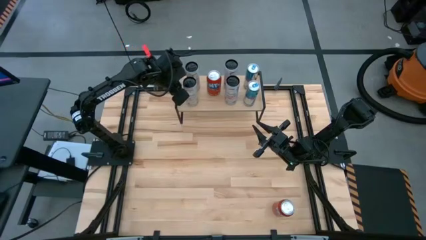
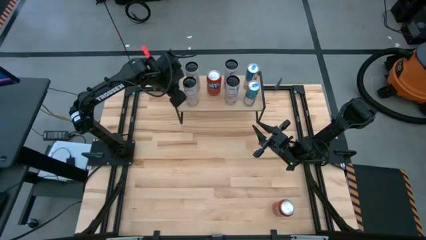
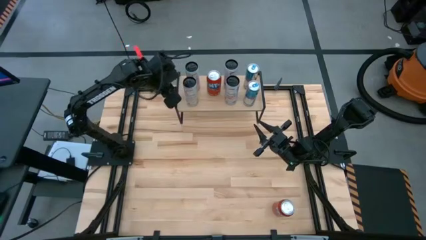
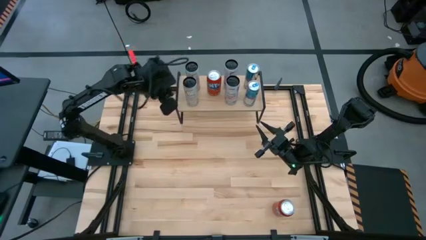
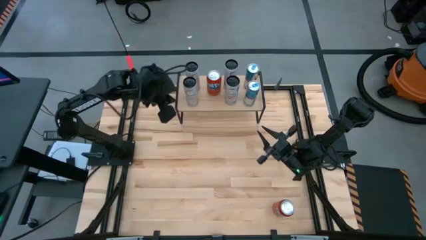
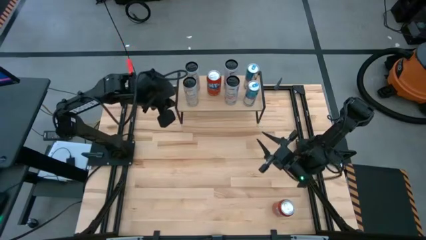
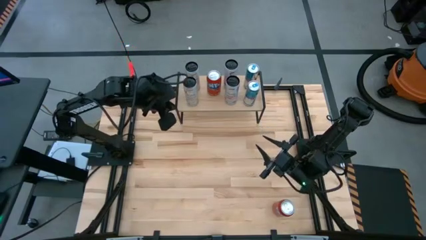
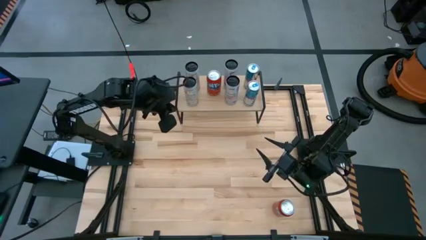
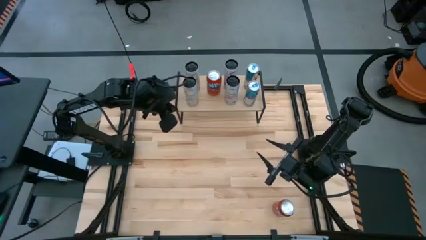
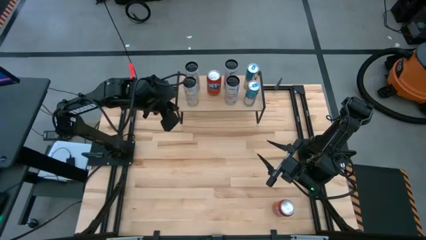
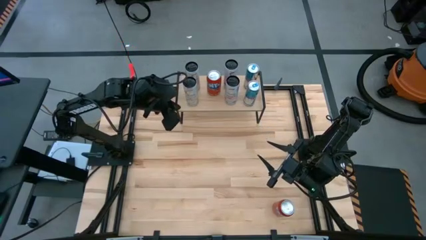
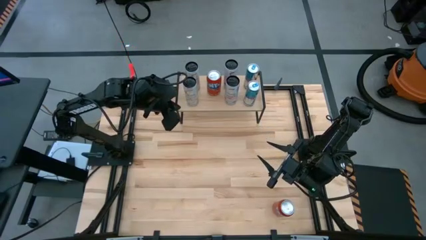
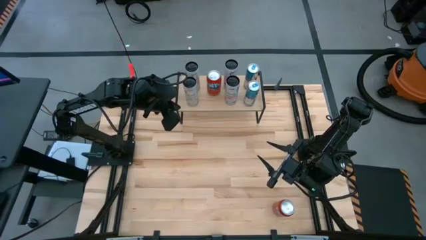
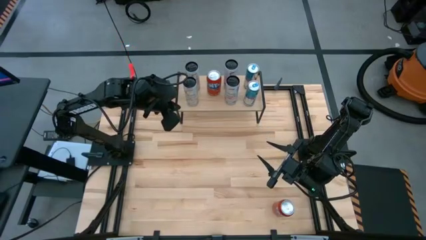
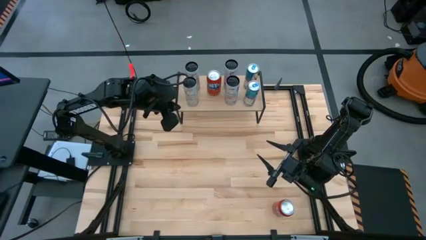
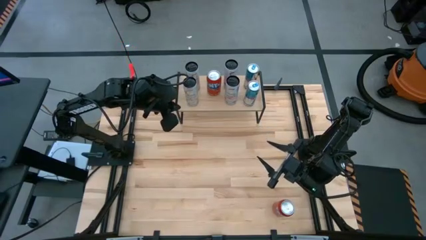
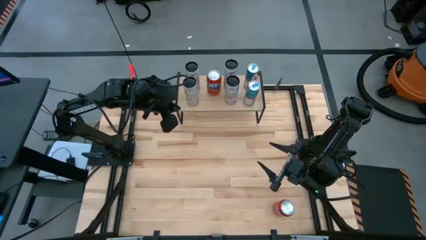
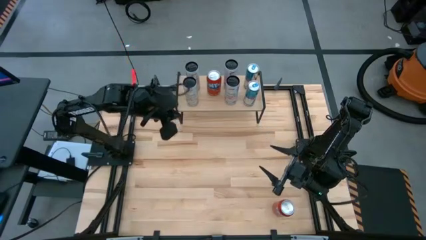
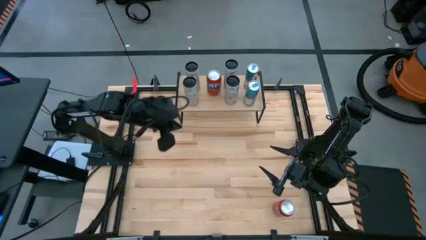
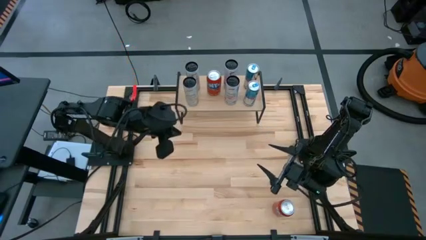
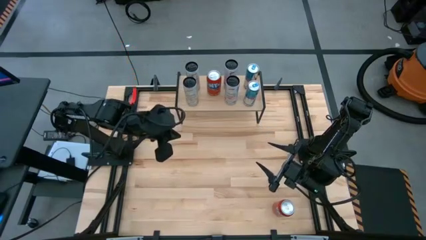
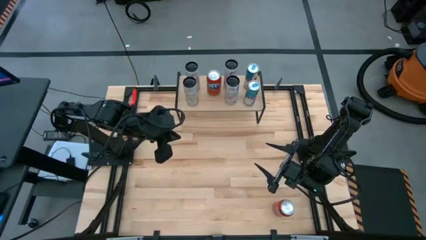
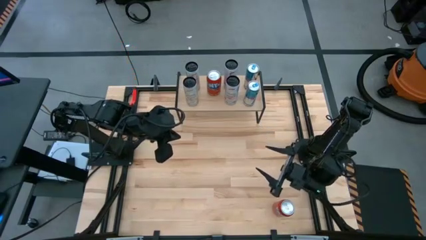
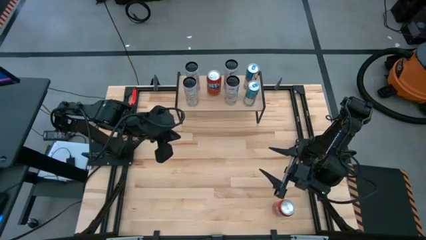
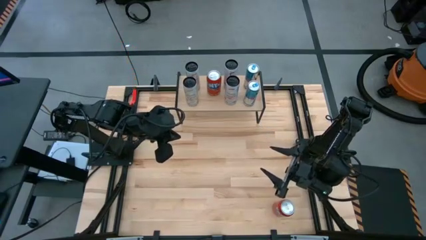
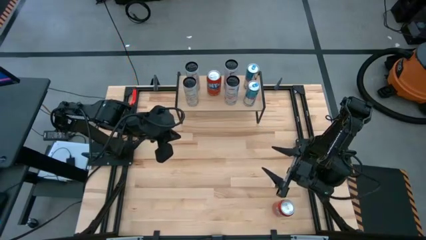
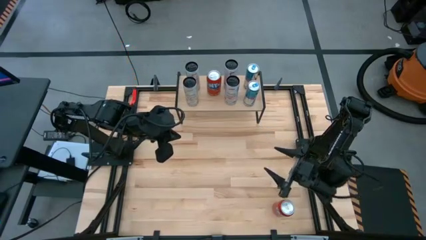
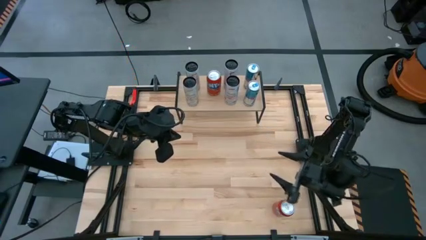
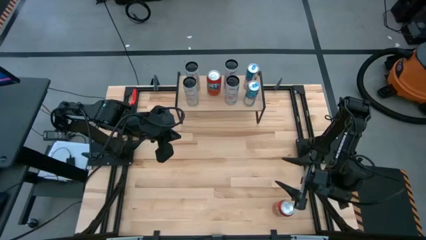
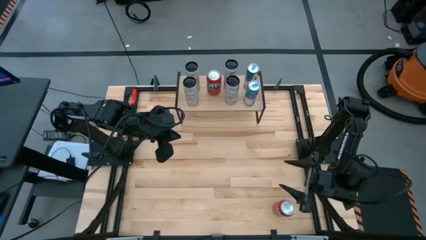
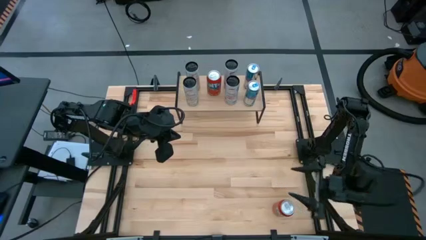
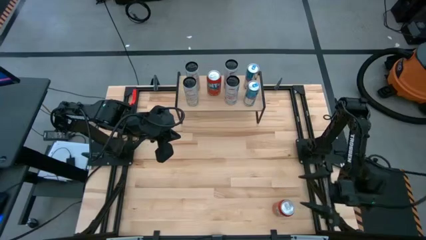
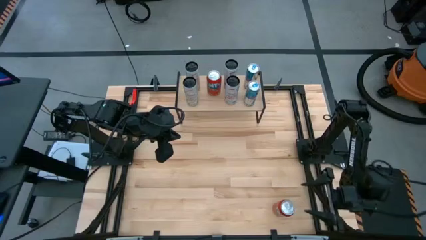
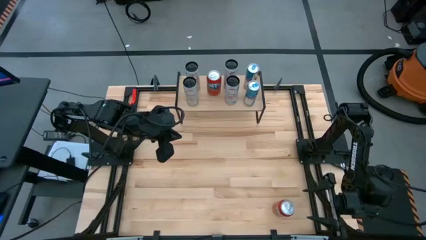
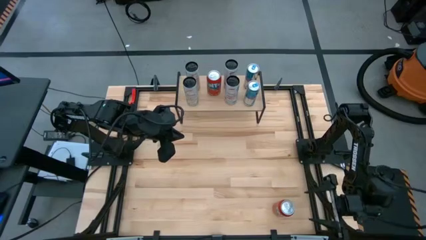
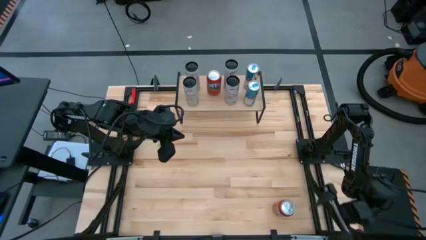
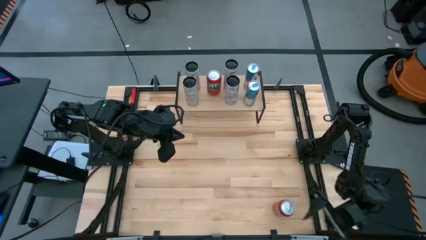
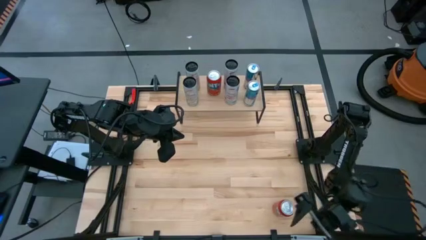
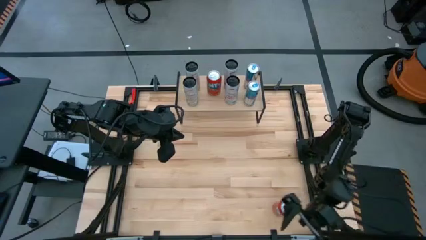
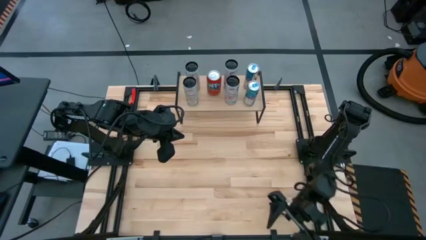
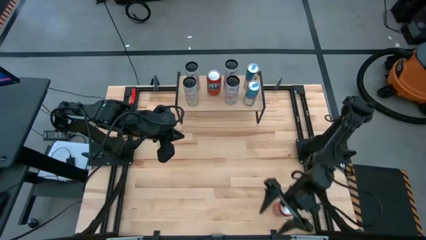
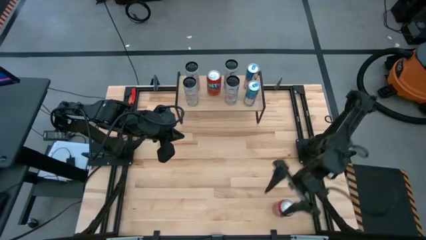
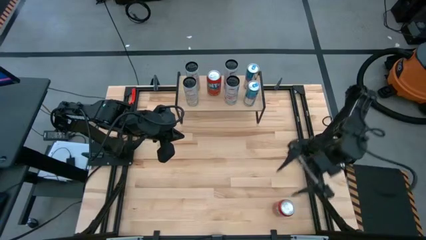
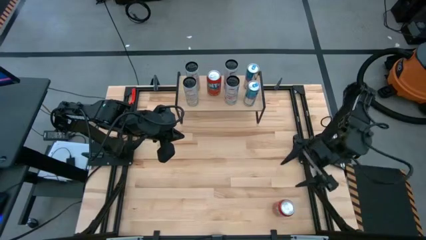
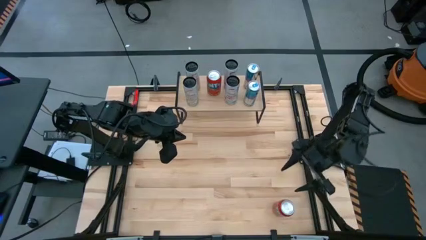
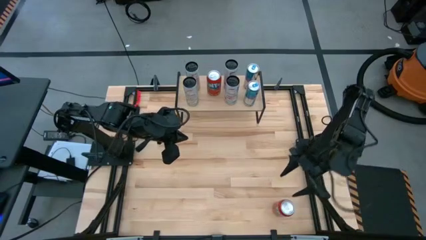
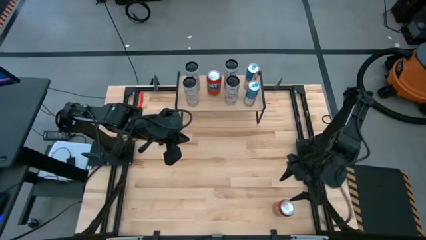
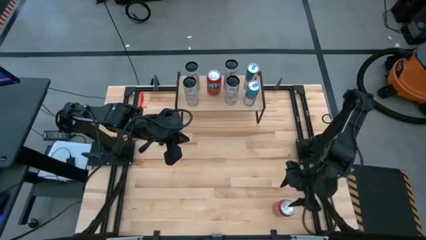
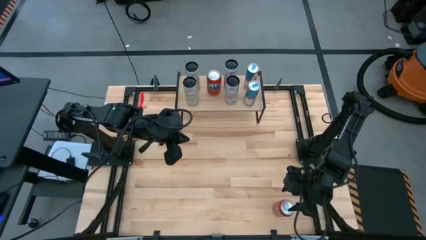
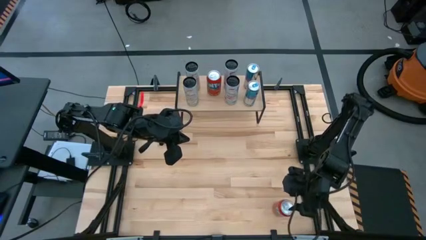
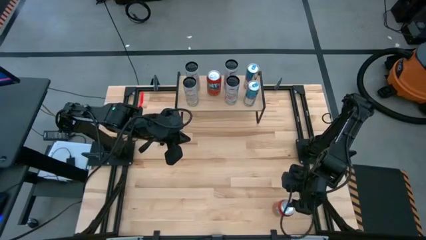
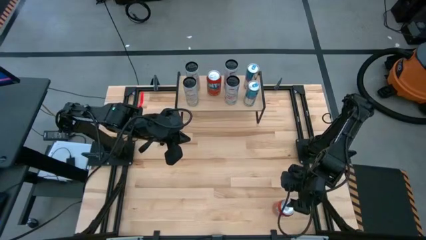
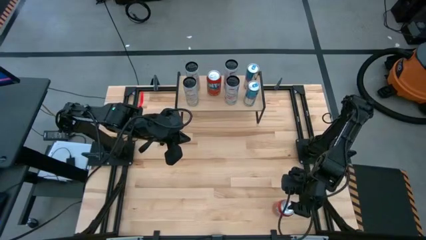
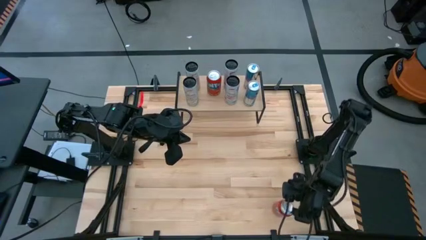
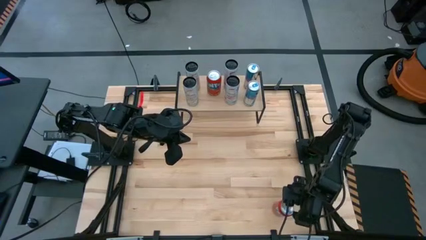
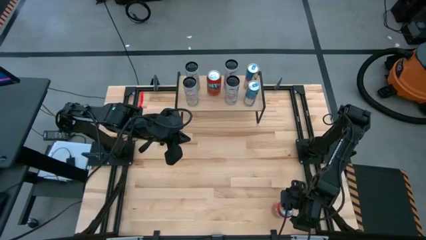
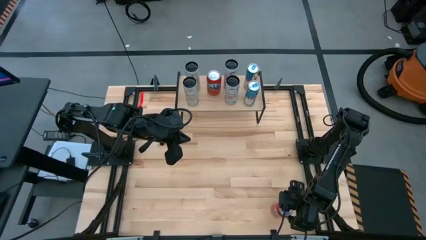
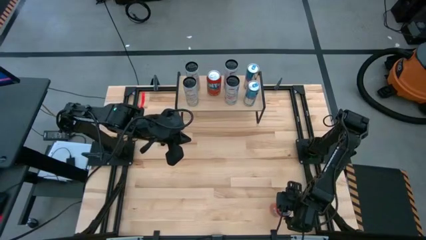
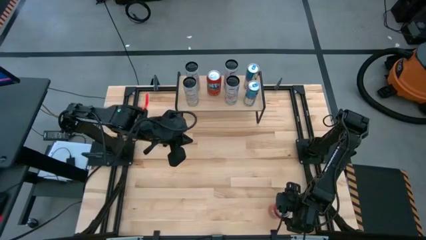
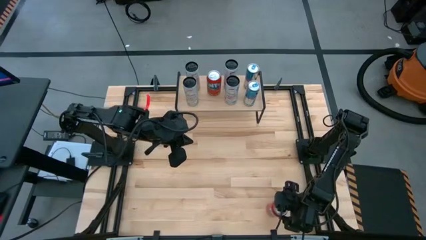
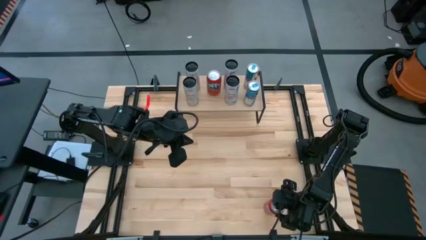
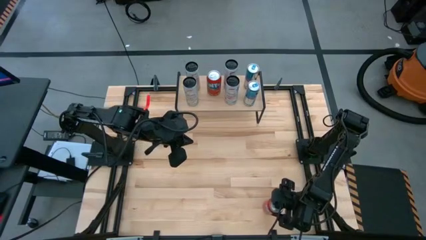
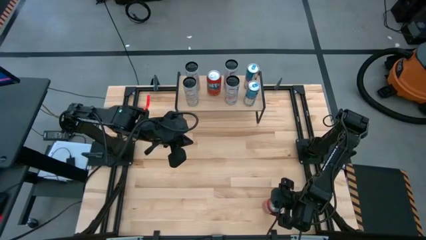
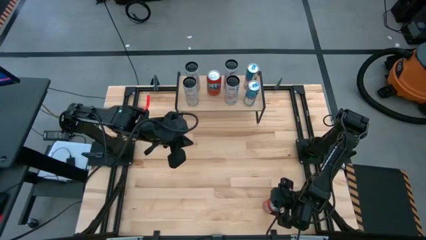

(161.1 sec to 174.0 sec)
Task: Place canned beverage on shelf
Put the red soda can on the shelf aligned with the other red soda can

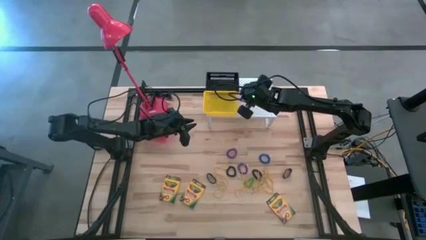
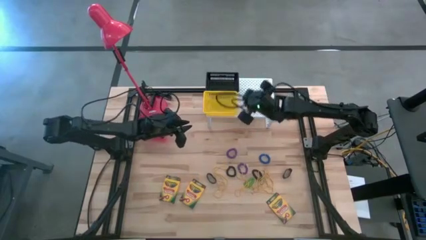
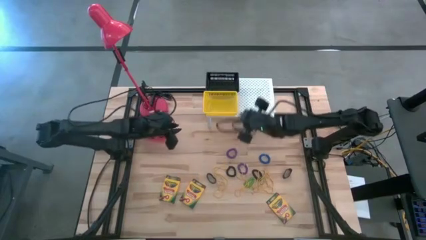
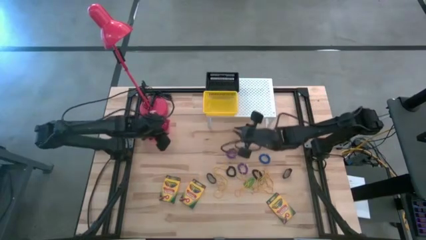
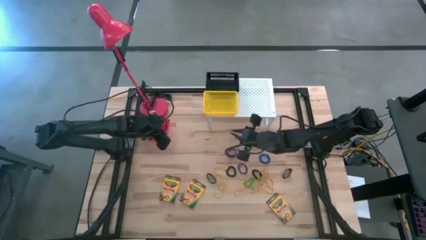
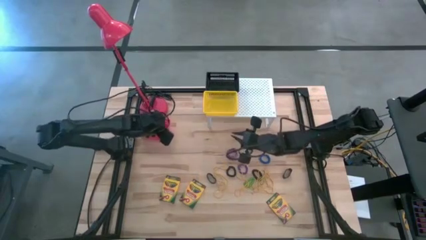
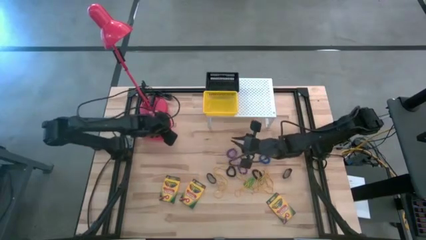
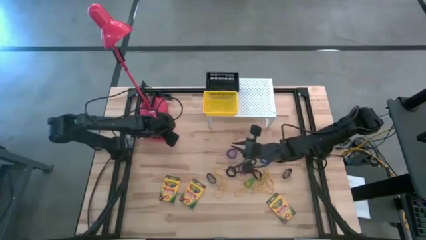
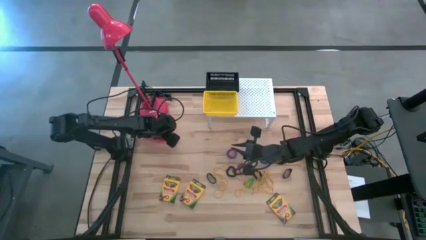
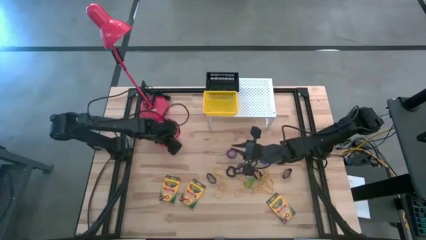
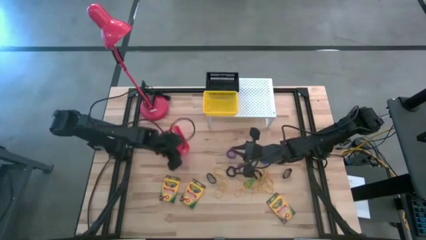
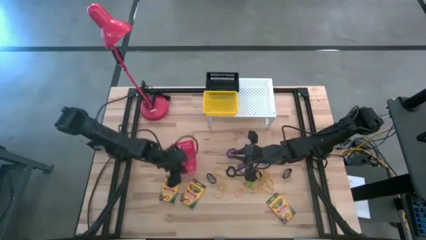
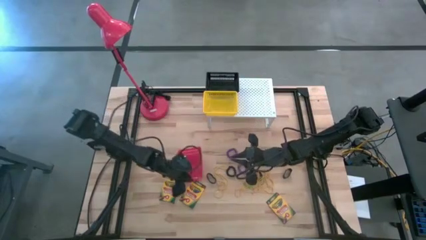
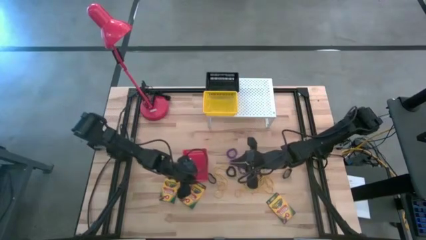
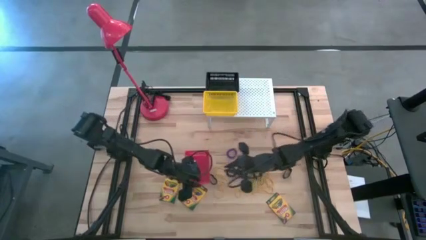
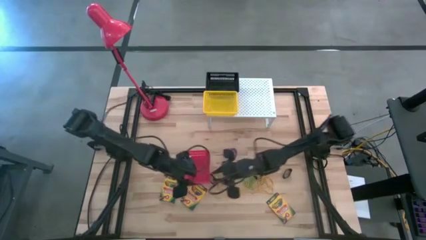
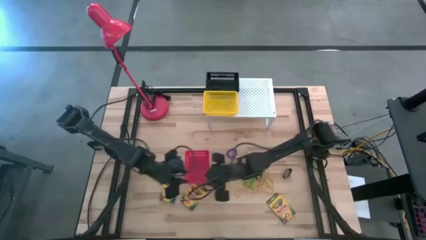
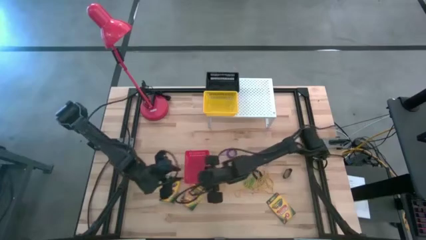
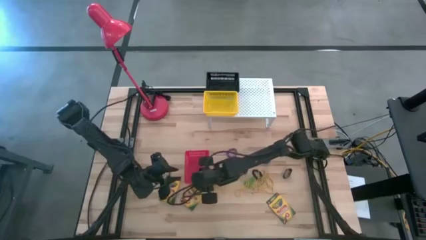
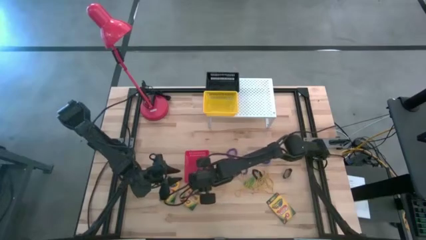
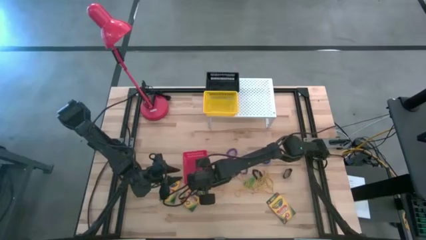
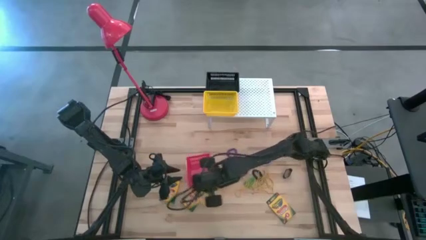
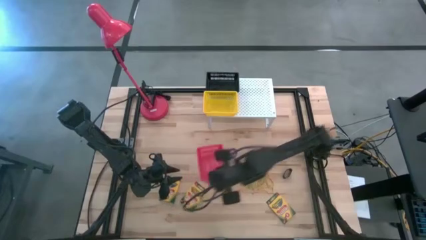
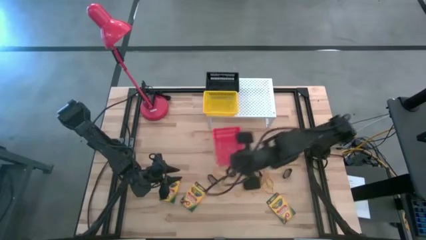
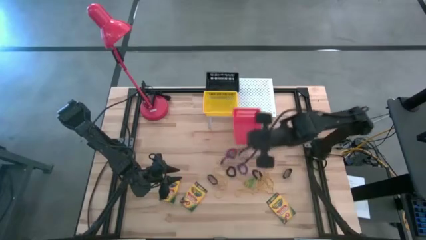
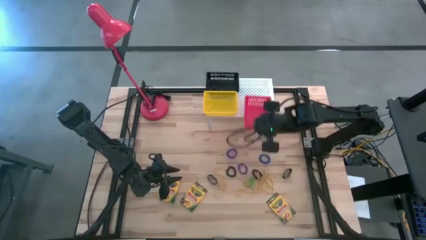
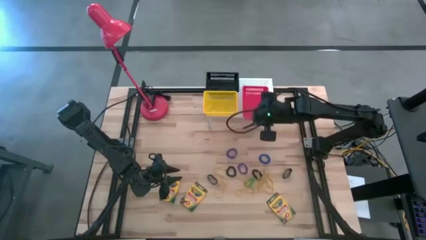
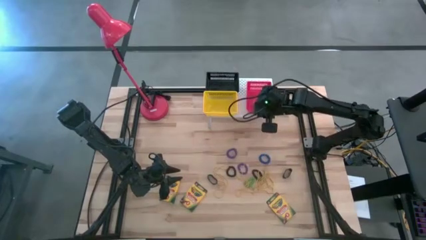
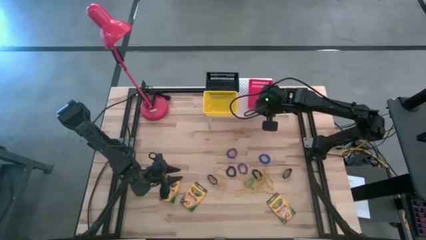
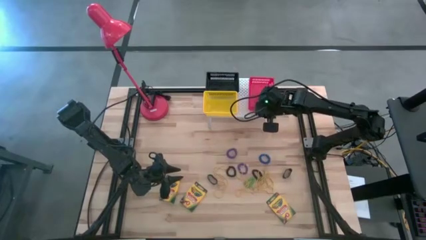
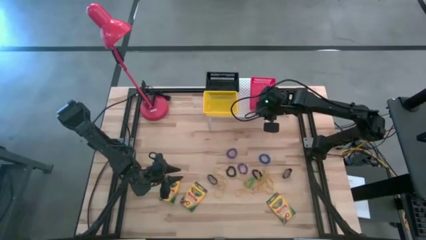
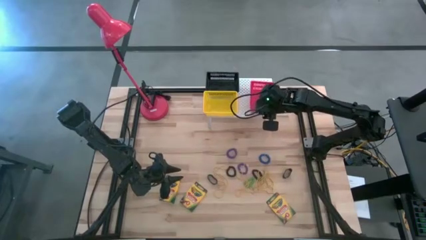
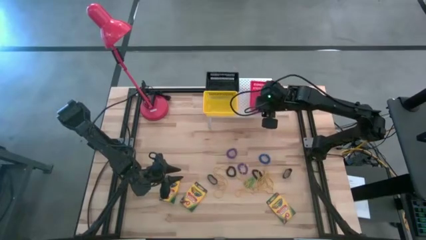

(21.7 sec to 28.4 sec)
Task: Pick & Place Office Desk Supplies
Put the red bin on the shelf
